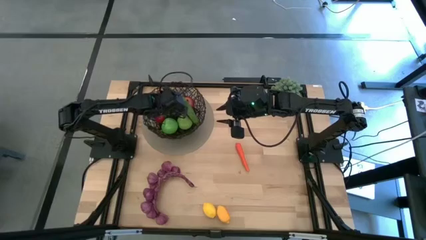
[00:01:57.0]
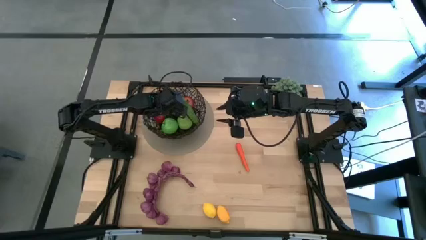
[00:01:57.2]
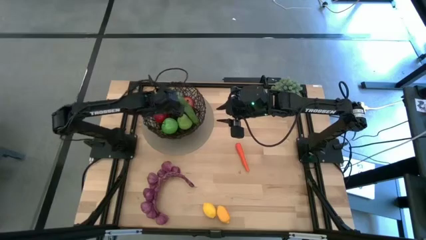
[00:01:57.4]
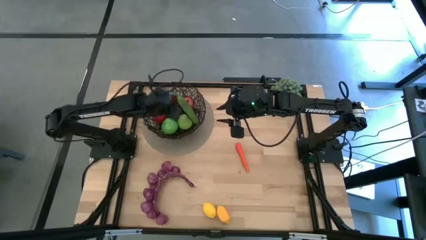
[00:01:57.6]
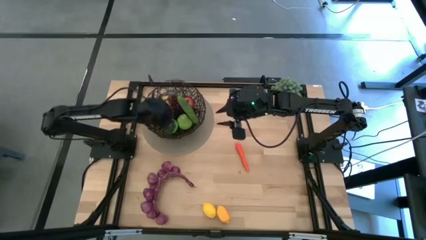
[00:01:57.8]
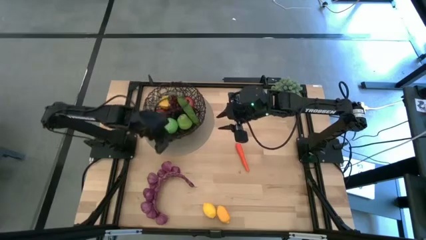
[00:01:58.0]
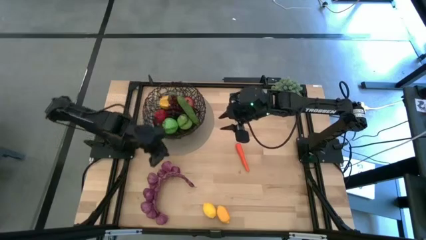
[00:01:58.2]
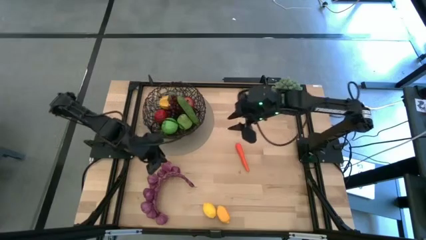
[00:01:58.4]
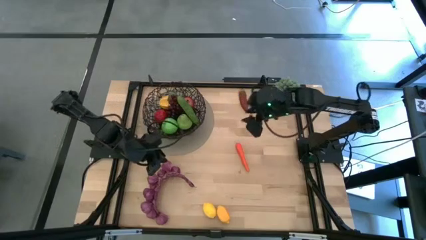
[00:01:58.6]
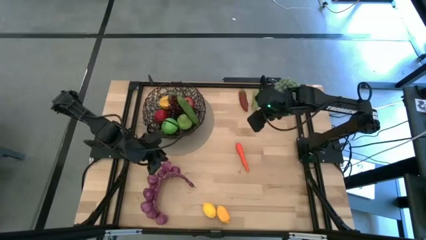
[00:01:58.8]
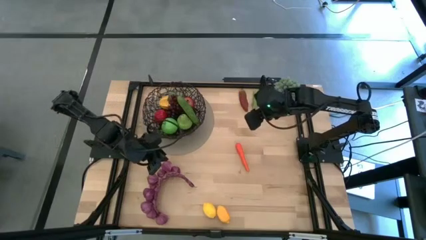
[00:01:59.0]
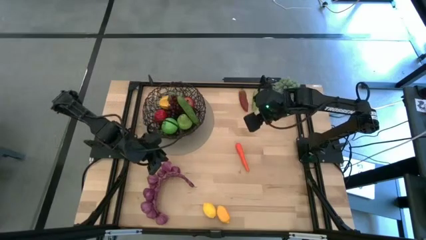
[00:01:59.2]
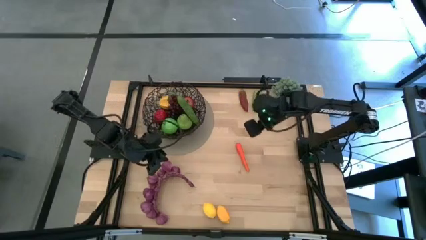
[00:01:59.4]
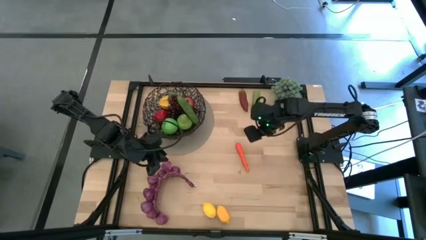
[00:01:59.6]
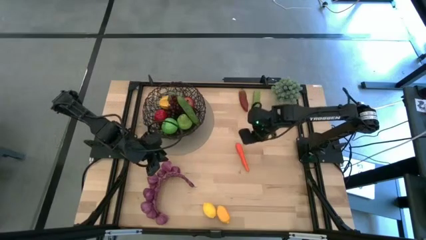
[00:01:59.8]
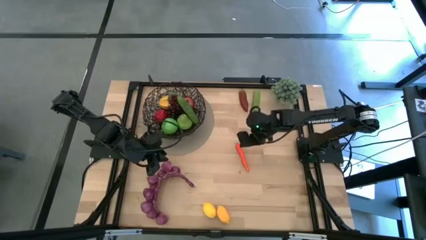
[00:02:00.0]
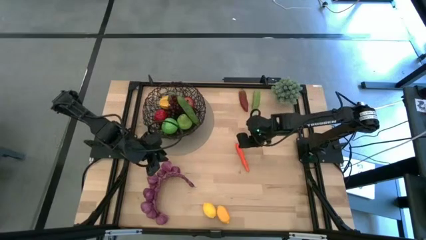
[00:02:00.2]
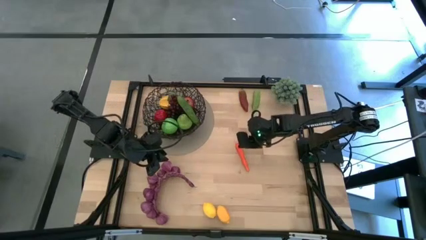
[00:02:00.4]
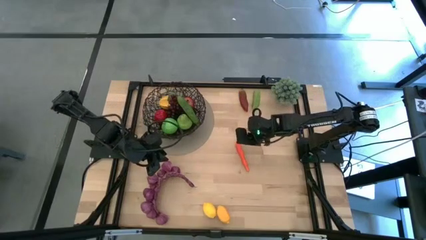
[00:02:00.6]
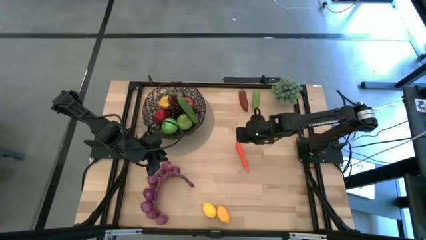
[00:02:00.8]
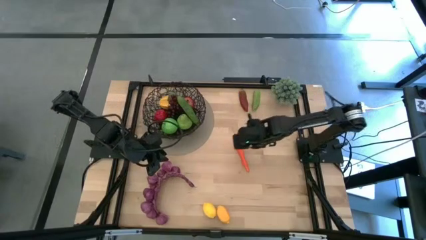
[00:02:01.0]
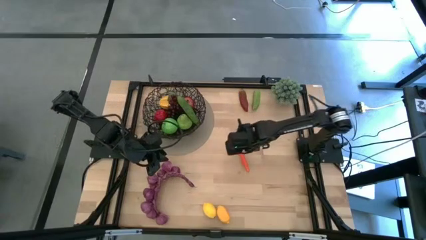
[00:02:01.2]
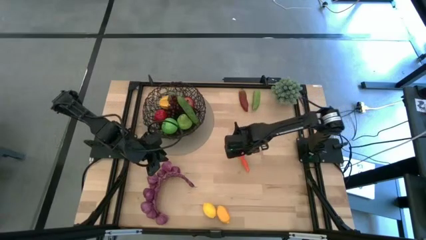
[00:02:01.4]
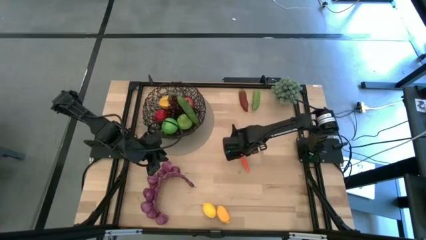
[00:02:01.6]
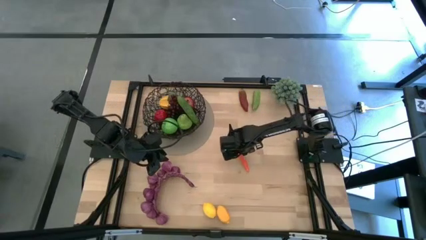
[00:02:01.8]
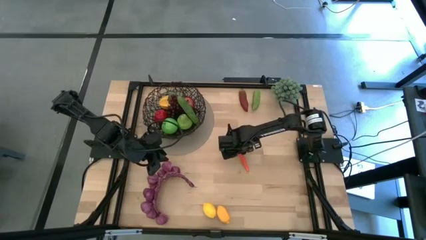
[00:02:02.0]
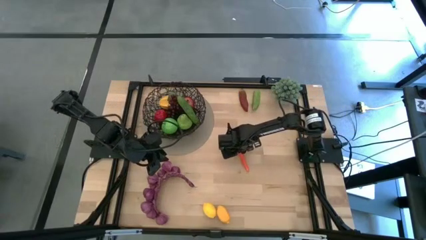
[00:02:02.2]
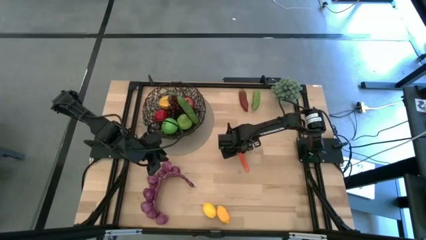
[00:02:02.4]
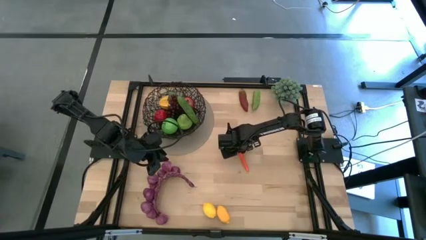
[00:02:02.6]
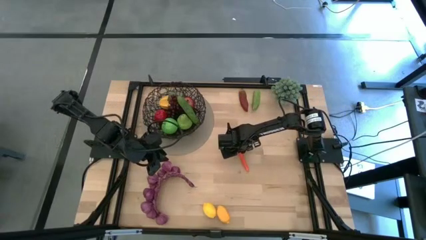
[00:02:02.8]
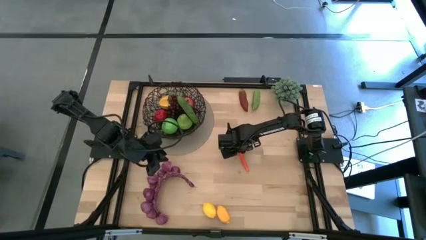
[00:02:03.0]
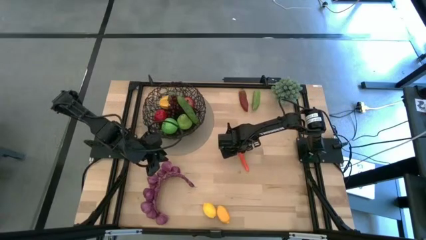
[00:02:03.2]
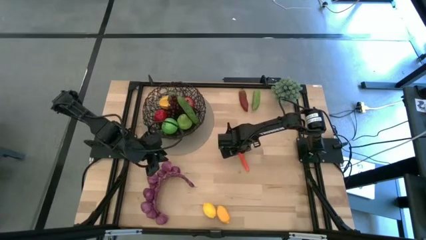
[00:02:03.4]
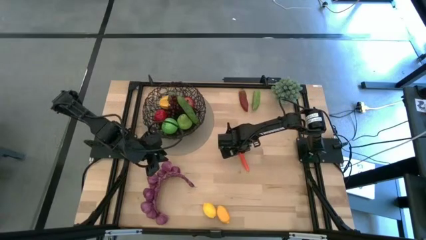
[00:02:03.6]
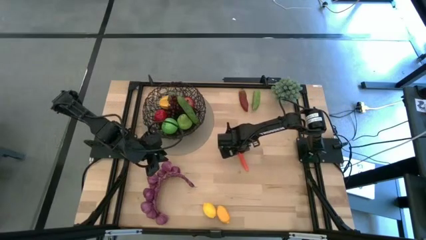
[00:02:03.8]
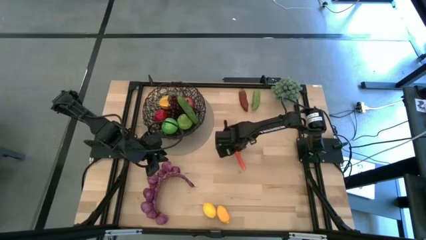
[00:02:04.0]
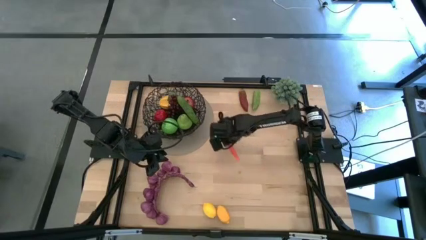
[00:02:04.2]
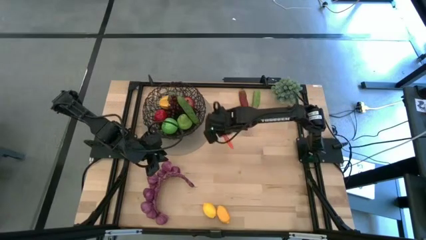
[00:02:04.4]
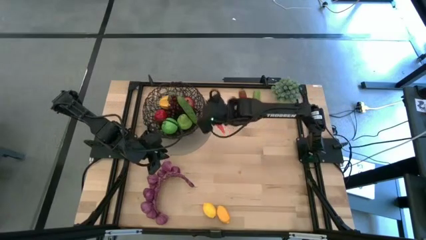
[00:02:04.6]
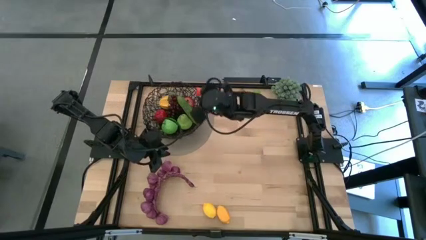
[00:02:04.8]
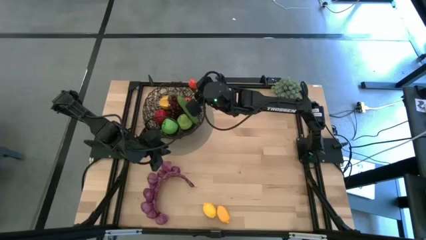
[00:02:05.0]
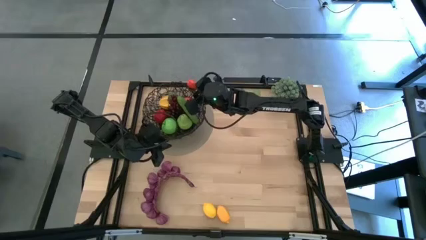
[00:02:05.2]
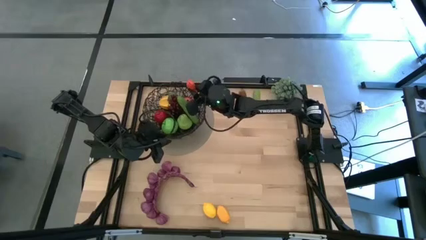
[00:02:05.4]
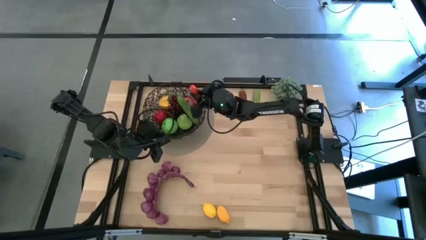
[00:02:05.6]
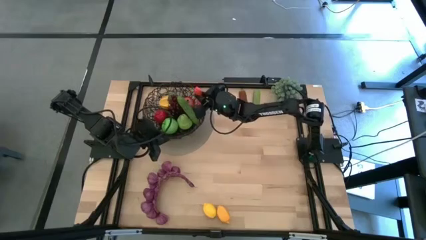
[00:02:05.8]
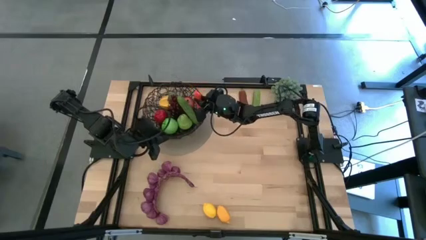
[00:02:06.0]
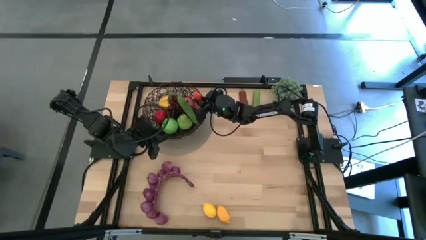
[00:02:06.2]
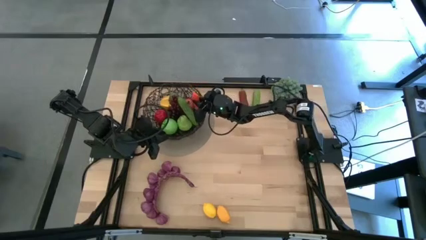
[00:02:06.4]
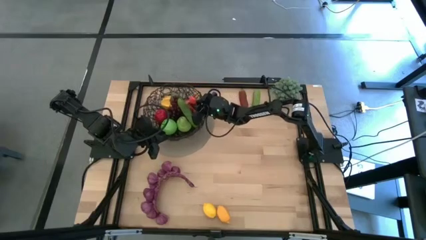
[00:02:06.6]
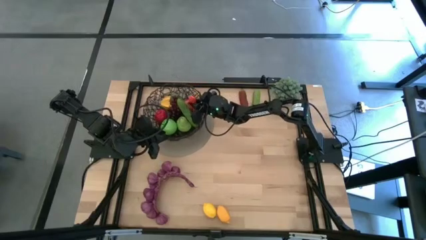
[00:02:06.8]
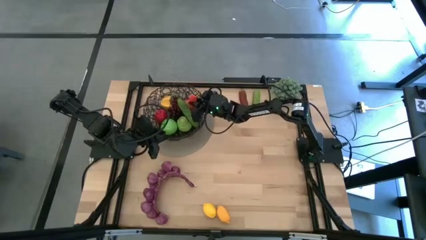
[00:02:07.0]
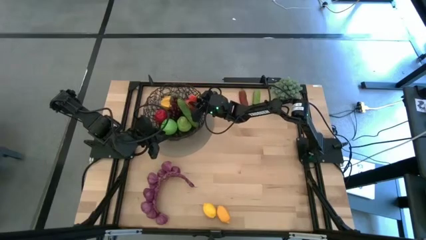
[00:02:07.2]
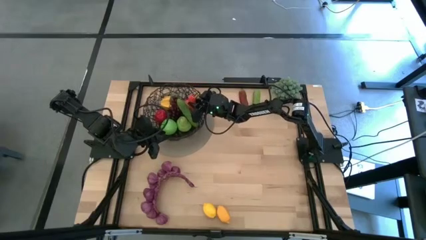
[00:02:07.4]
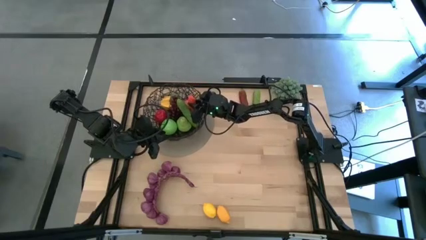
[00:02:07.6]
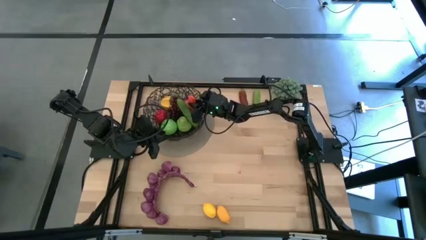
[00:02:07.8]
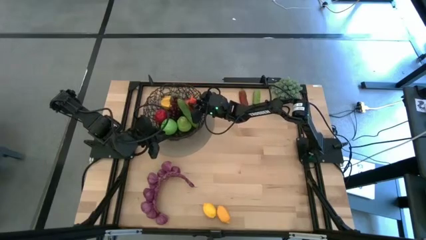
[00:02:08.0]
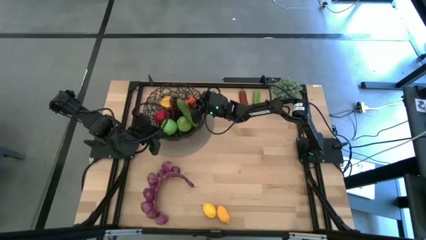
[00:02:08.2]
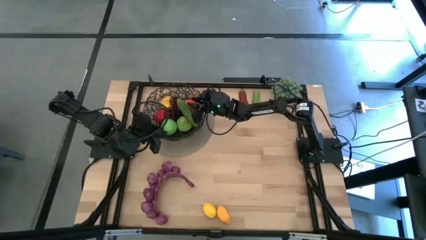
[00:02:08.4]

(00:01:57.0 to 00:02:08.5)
Task: Build produce basket
Put the orange carrot into the black wire basket

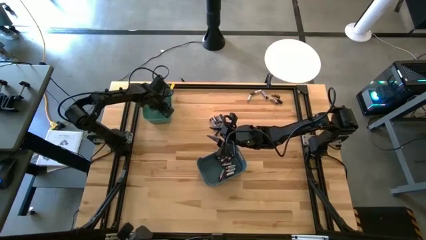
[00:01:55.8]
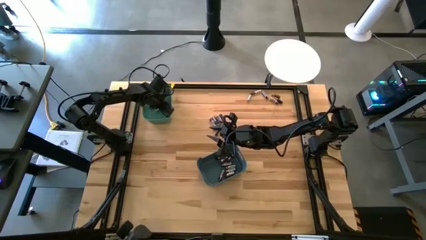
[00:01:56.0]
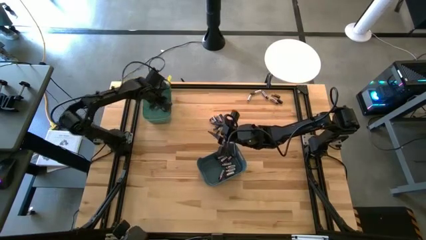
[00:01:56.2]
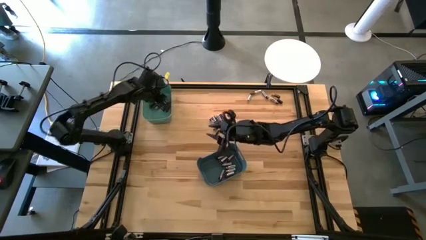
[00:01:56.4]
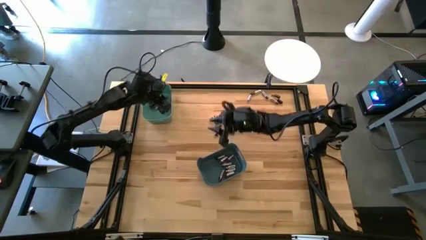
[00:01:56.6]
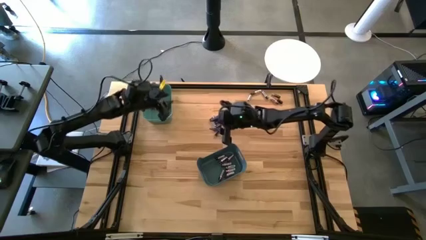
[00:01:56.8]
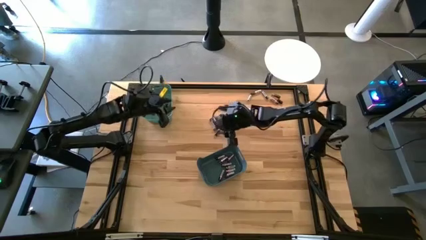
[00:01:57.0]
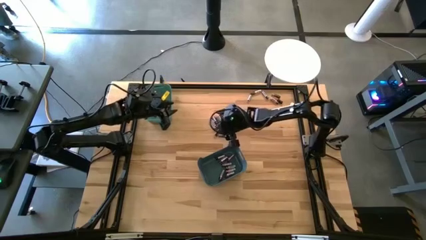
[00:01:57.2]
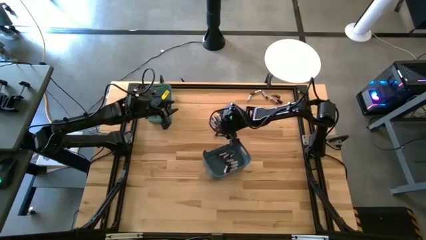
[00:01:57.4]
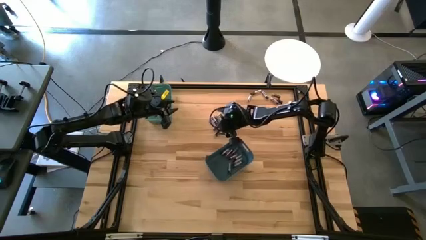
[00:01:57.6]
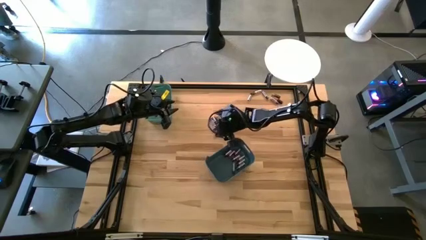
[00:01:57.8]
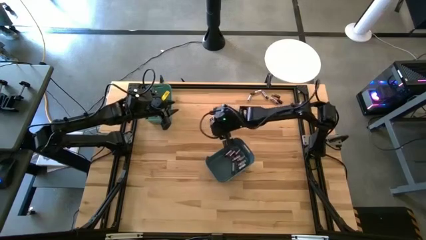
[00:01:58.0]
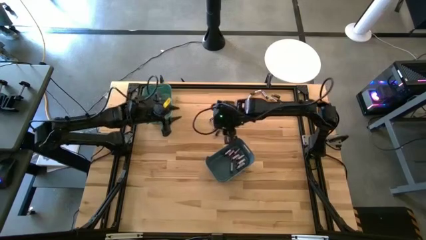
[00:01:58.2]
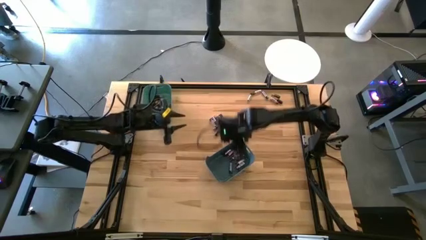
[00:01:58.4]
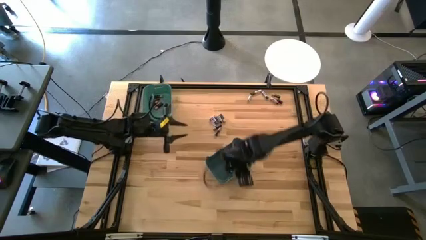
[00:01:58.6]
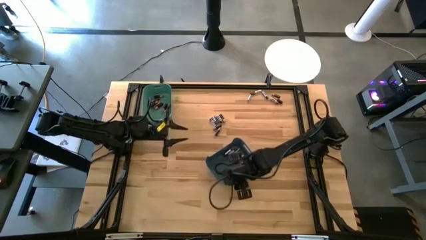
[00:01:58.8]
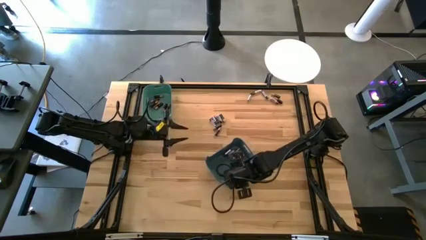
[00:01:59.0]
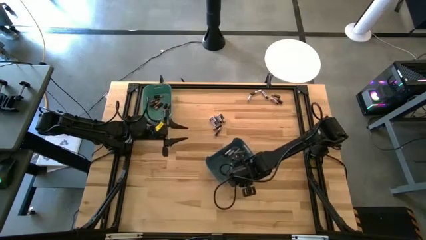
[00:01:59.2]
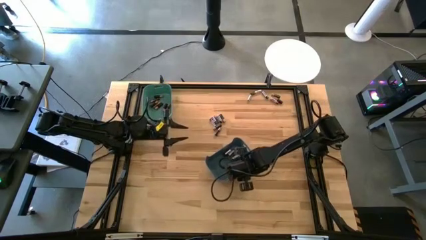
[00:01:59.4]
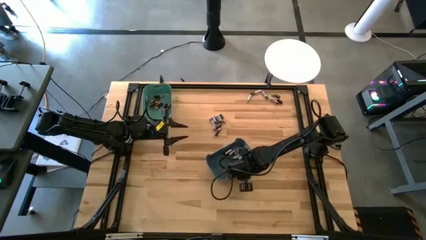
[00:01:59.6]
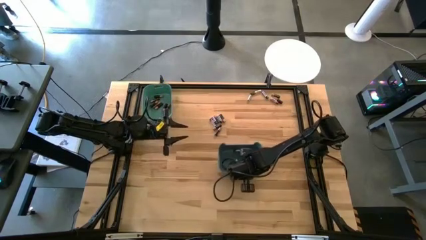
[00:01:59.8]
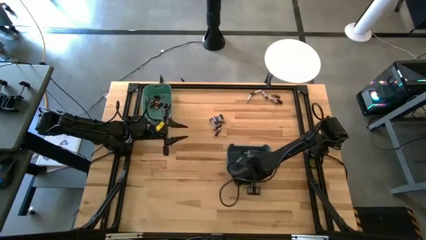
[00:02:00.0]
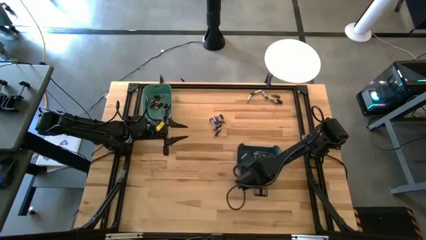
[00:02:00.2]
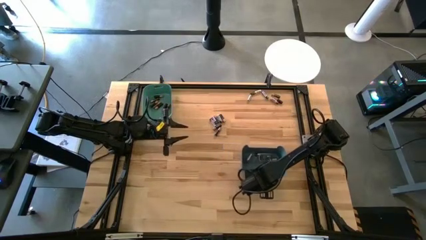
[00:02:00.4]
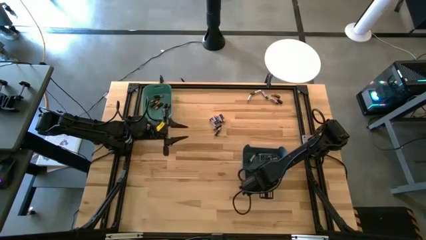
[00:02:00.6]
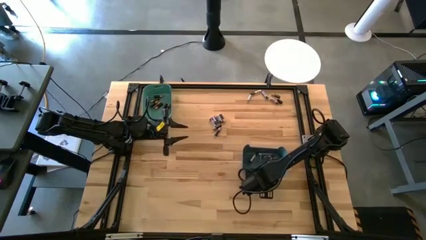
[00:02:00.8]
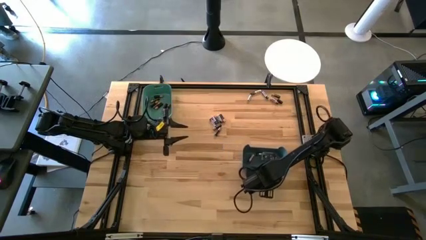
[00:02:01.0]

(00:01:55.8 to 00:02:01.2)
Task: Sort batteries
Move the blue bin to the middle right of the table
